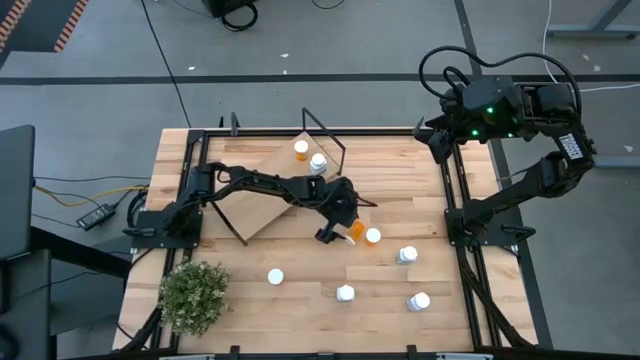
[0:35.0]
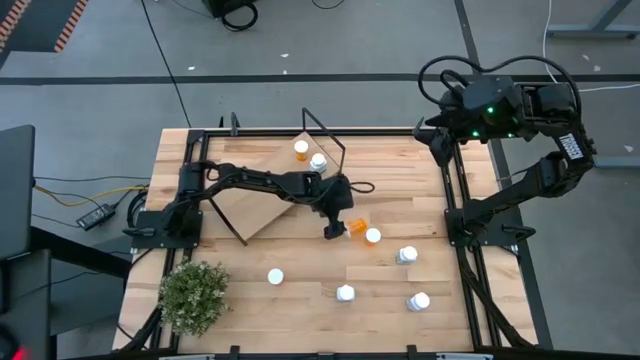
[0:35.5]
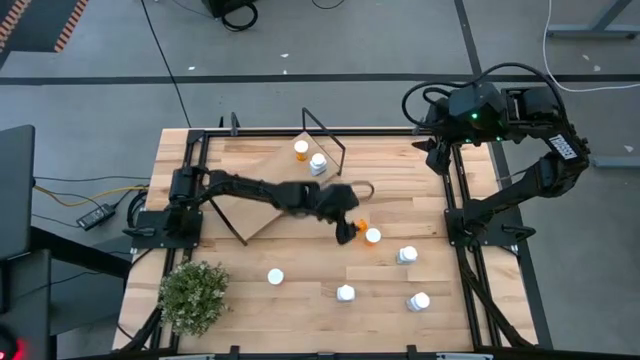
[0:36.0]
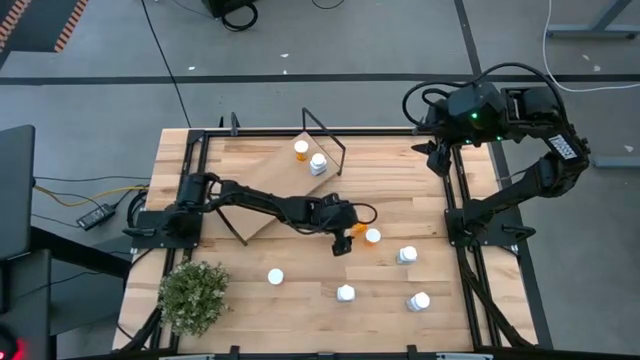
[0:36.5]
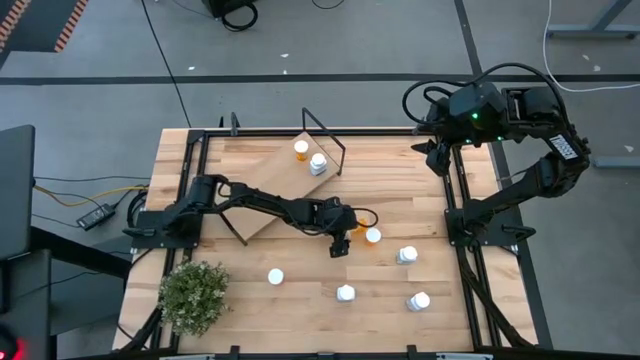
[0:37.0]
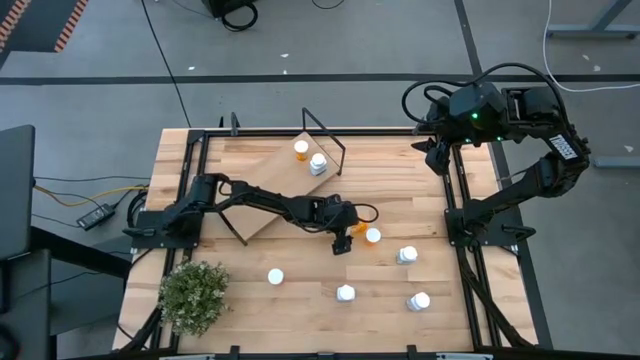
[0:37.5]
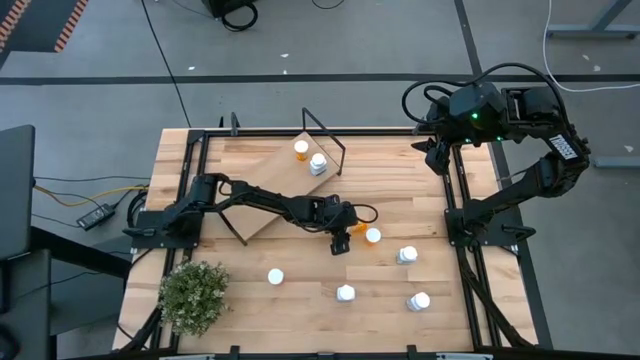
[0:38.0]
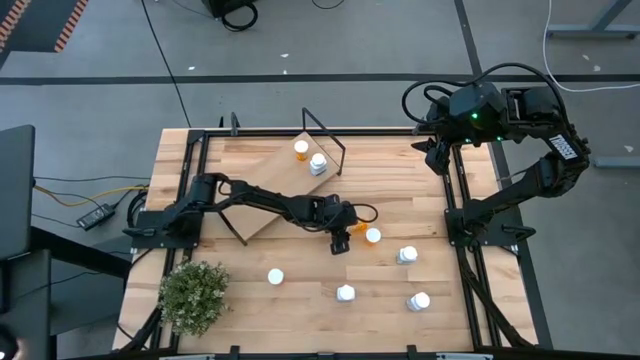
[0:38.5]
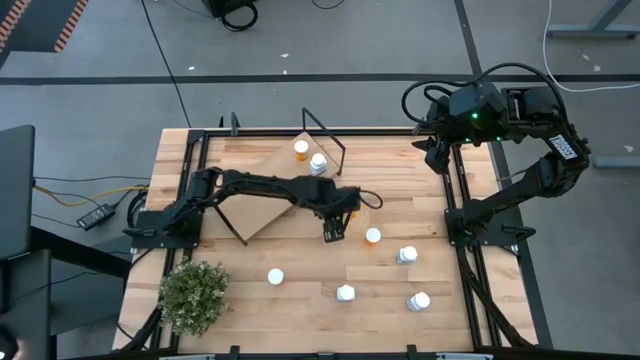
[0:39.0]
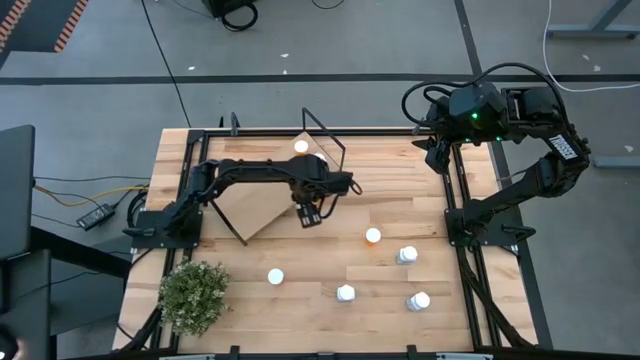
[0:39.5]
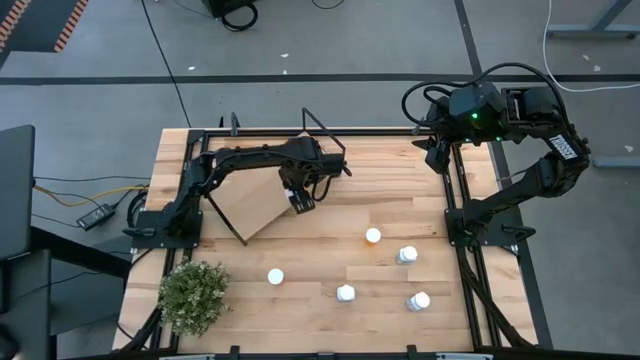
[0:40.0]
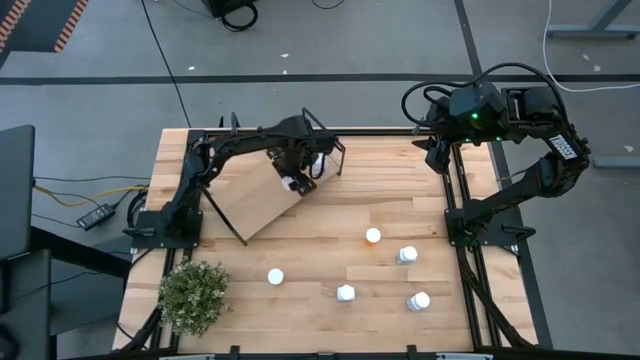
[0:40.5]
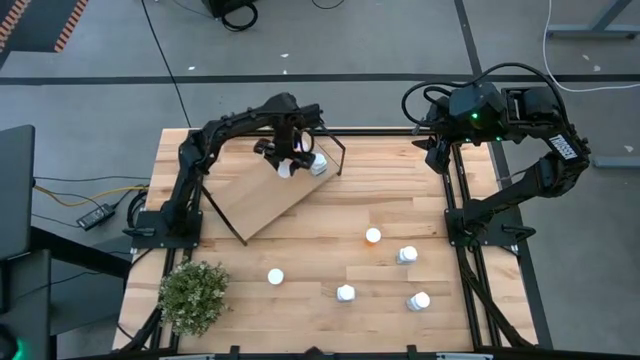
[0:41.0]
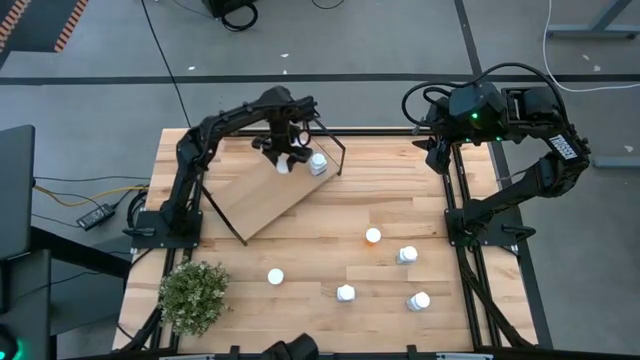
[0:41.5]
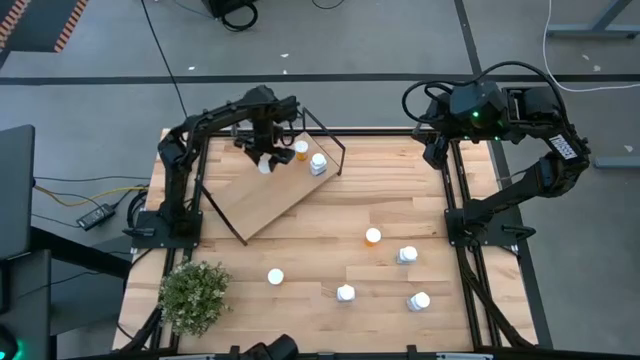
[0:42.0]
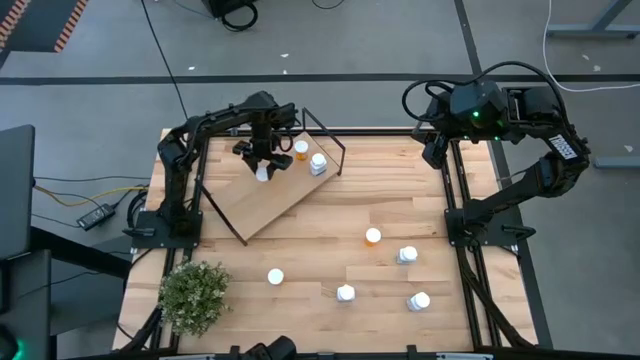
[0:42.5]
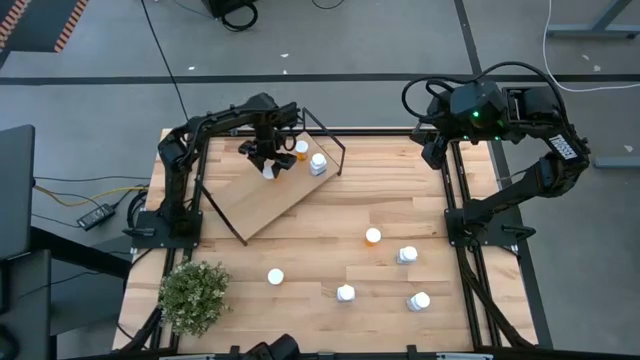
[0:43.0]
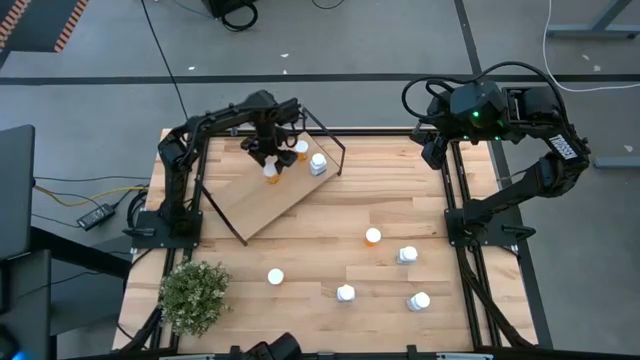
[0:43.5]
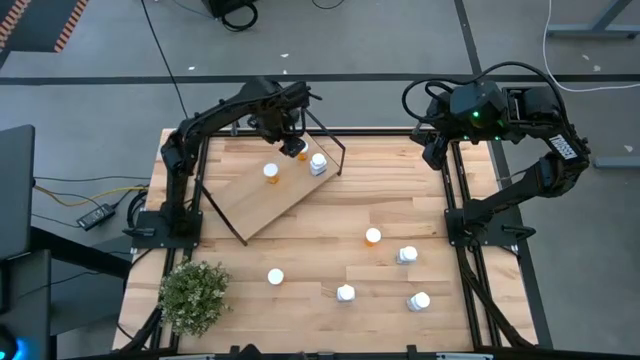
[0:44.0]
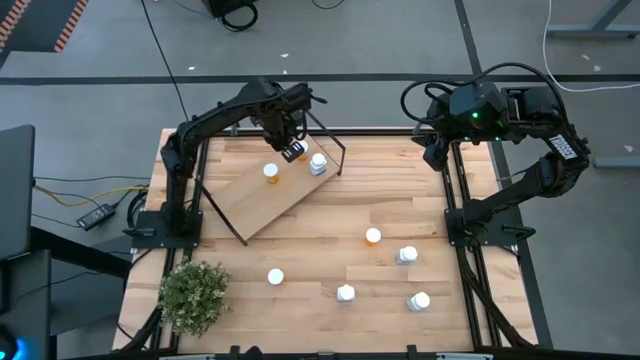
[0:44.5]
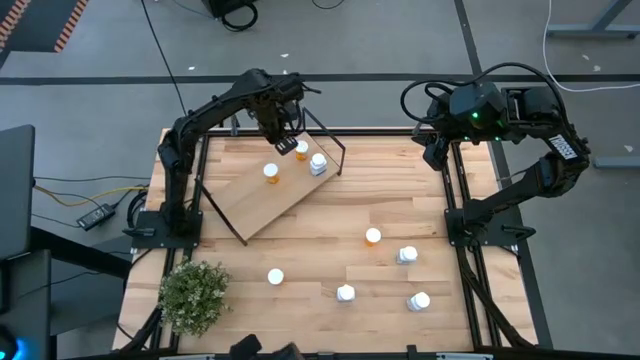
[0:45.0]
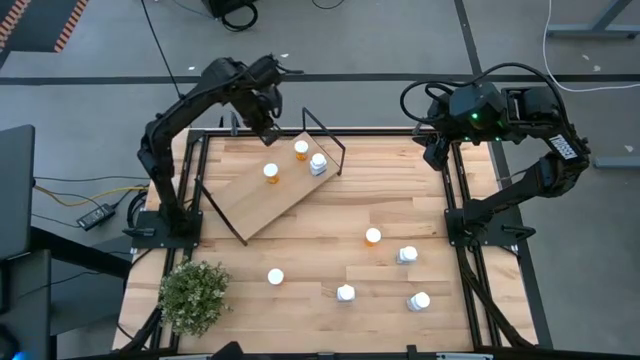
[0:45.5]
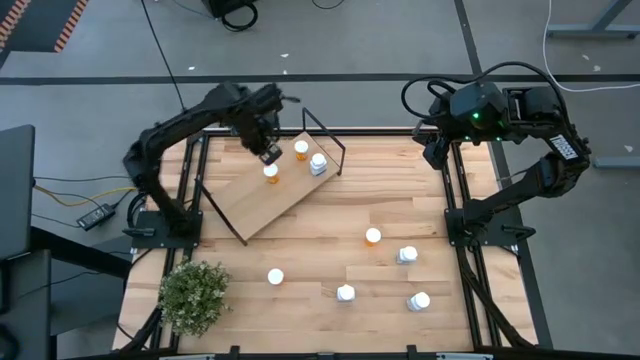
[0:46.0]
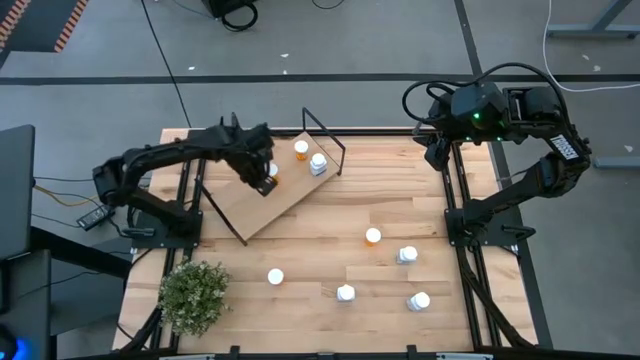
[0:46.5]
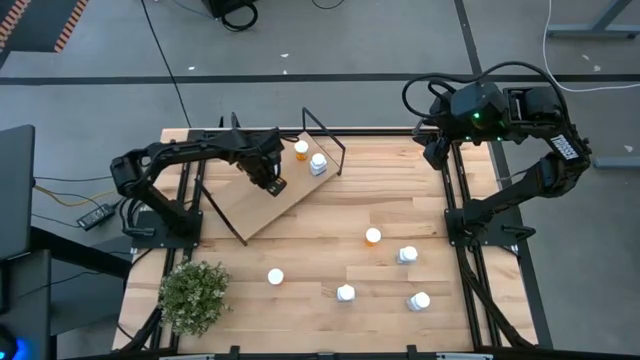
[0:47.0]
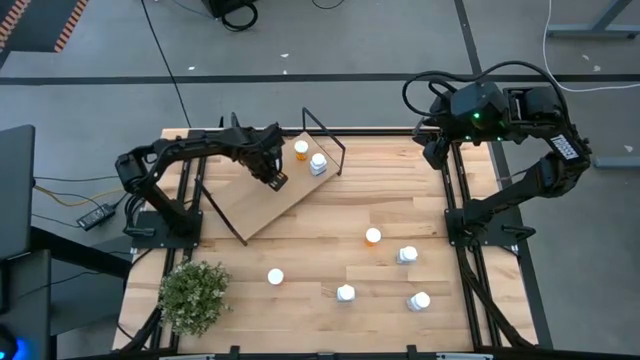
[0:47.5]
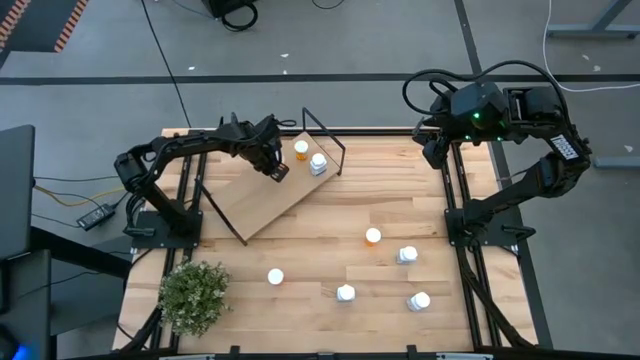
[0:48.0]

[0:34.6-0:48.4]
Task: Pick and place medicine bottles onto shelf by color
Put the orange pill bottle on the shelf

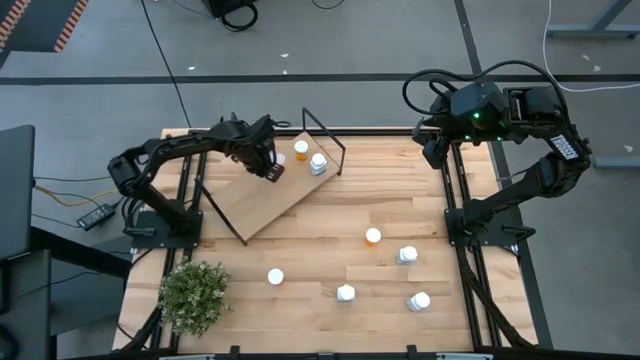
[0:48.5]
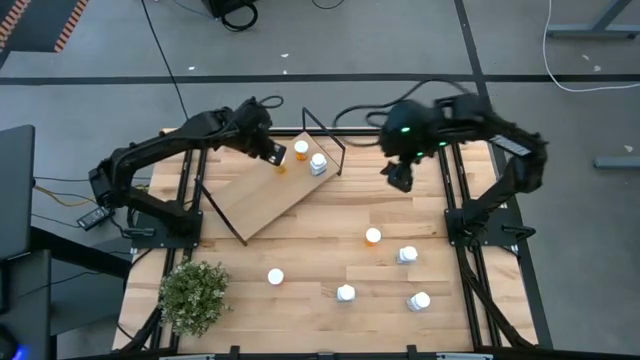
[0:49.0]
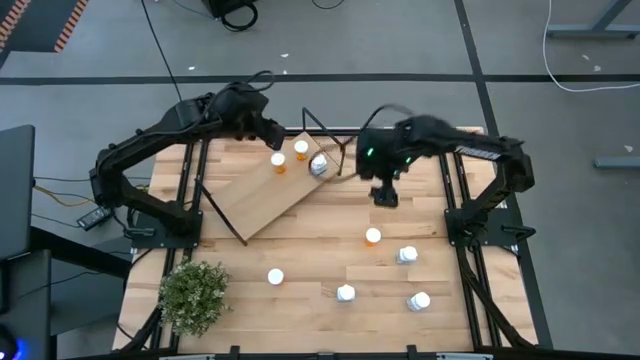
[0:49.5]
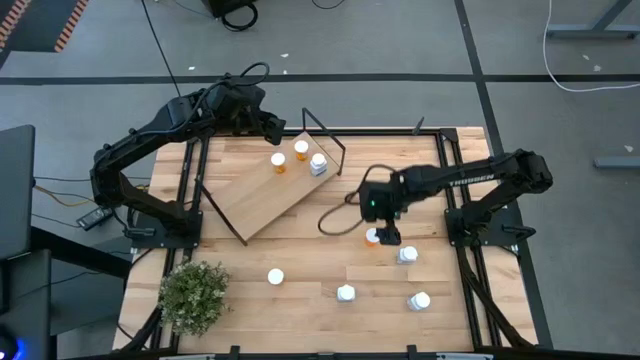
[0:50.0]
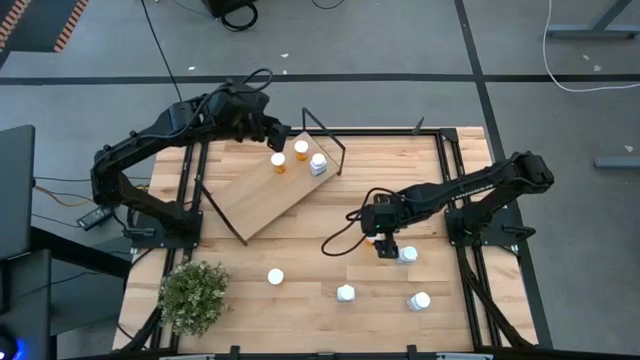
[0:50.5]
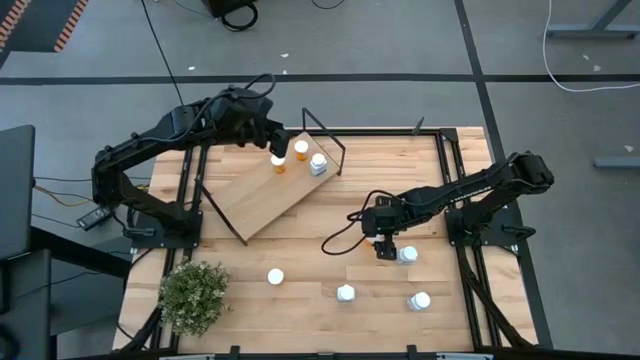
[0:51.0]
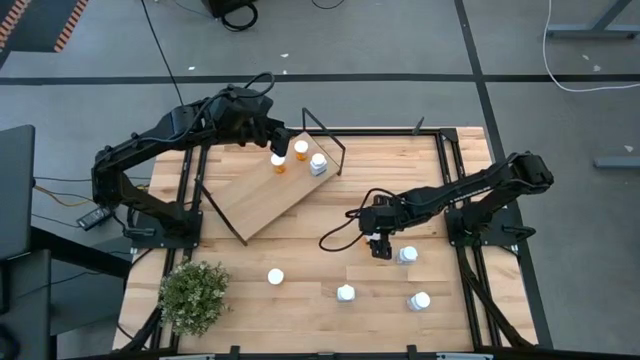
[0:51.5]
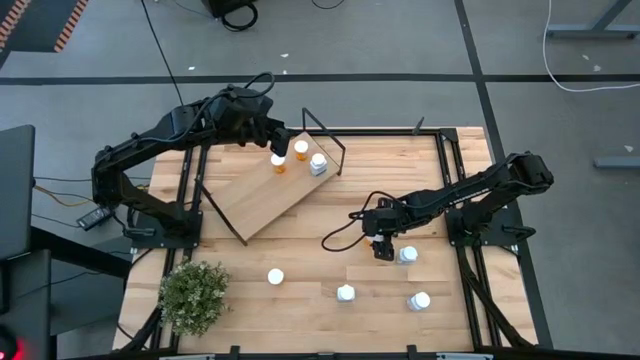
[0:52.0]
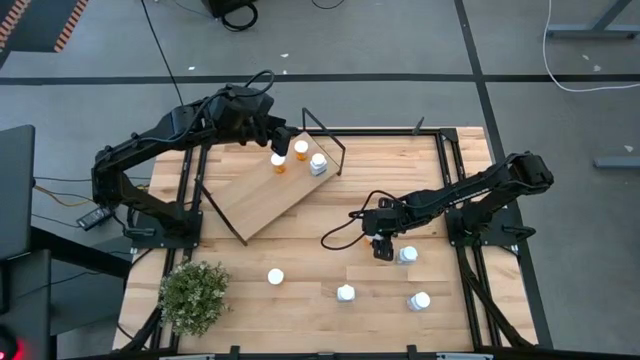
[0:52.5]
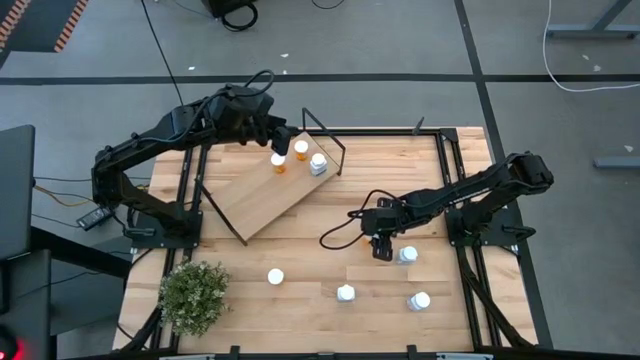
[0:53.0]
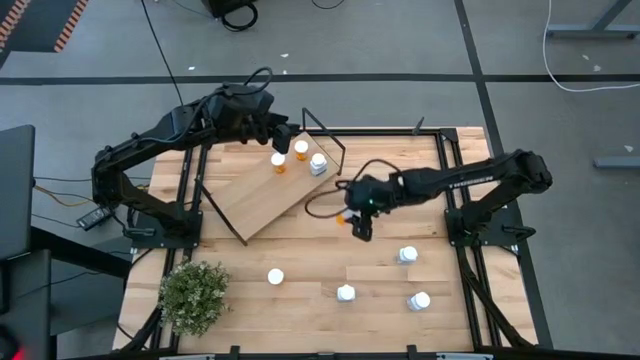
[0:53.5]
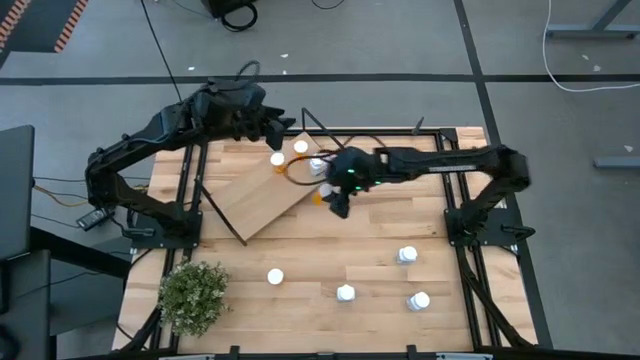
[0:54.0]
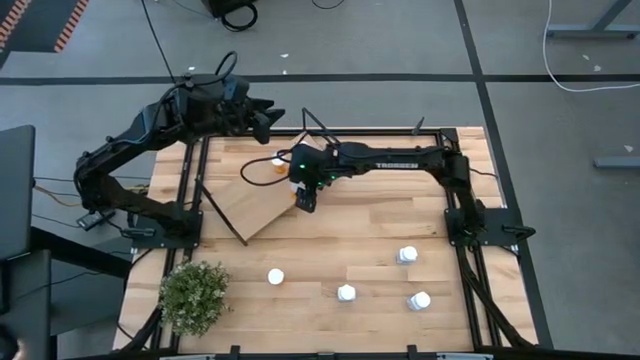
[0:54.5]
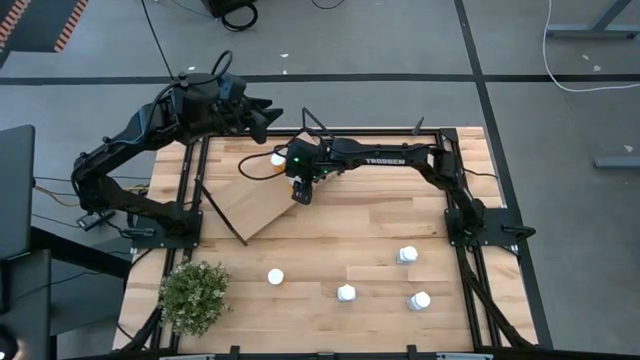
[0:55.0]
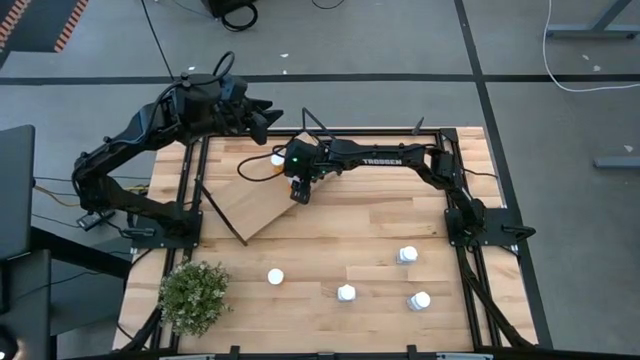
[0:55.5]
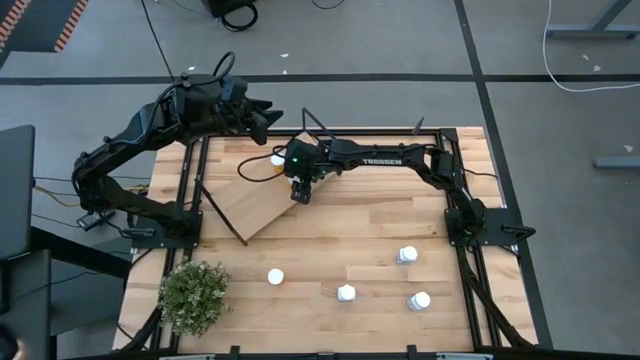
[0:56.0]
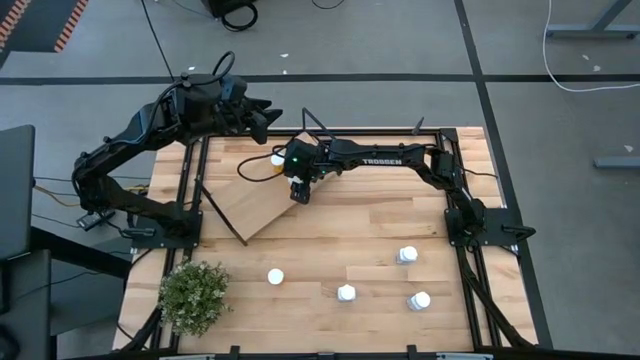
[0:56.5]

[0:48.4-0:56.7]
Put the orange pill bottle on the shelf
